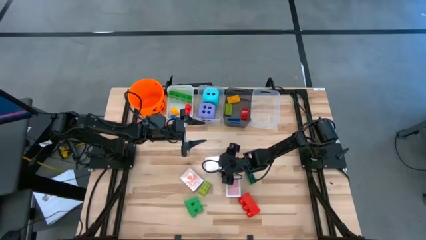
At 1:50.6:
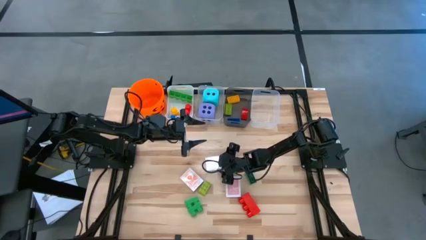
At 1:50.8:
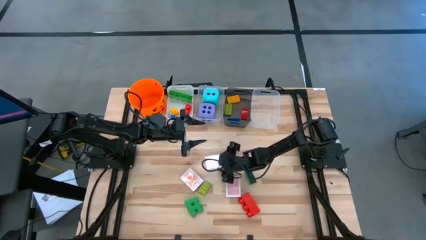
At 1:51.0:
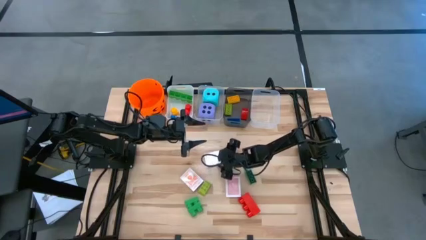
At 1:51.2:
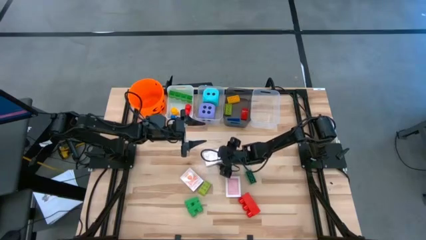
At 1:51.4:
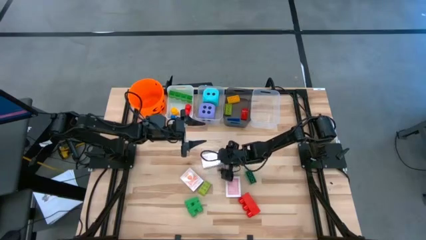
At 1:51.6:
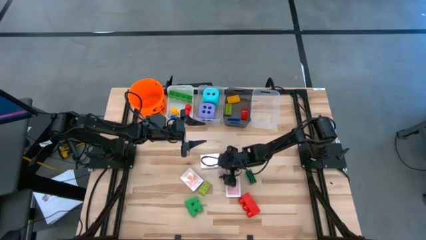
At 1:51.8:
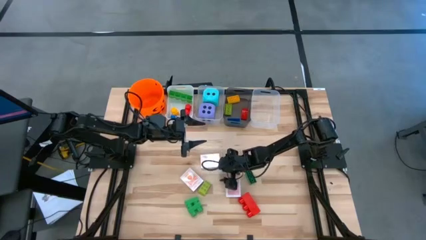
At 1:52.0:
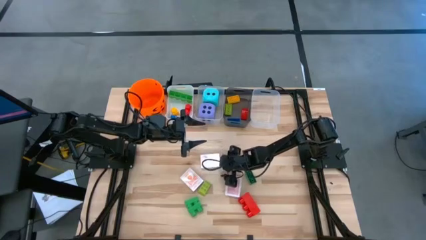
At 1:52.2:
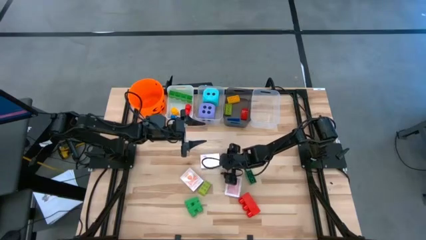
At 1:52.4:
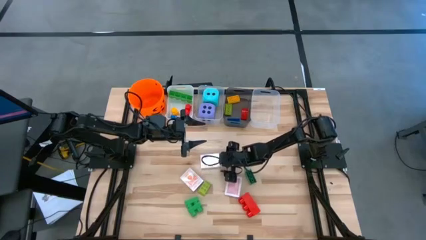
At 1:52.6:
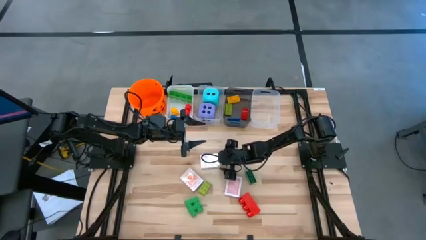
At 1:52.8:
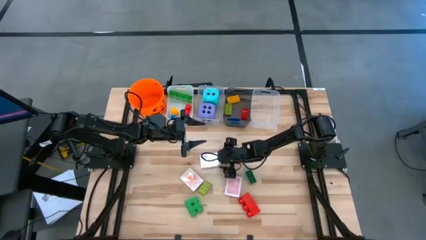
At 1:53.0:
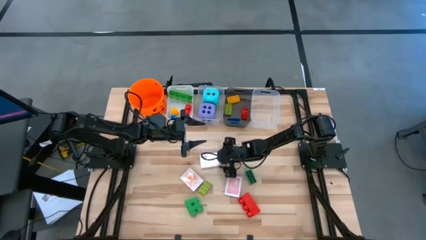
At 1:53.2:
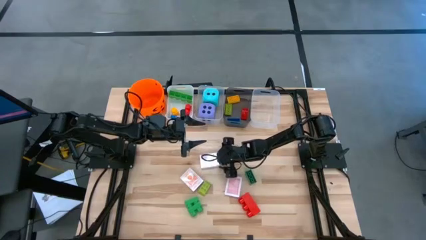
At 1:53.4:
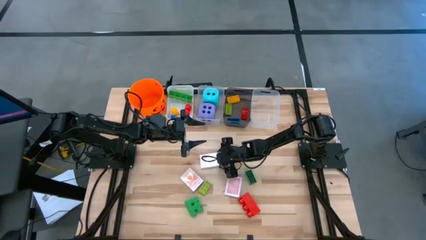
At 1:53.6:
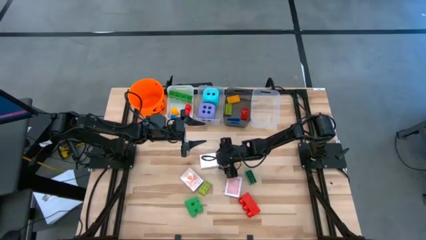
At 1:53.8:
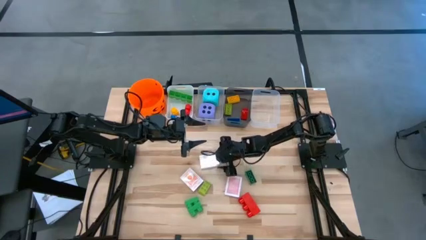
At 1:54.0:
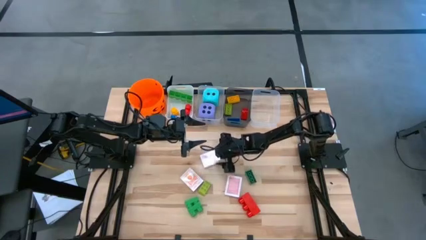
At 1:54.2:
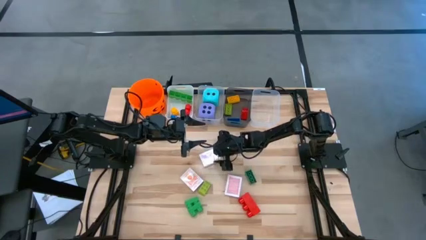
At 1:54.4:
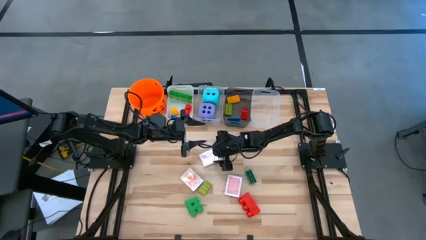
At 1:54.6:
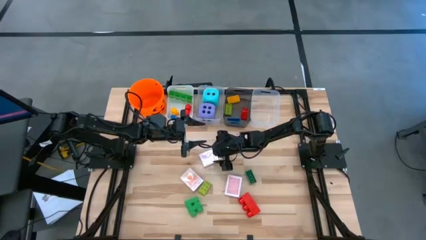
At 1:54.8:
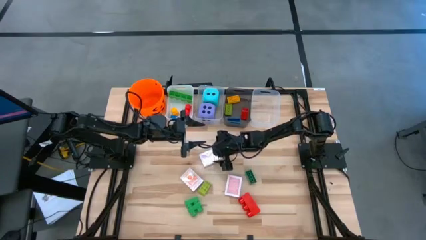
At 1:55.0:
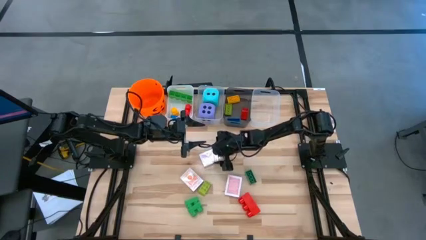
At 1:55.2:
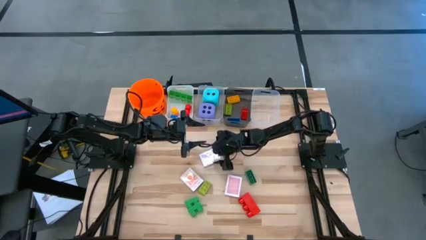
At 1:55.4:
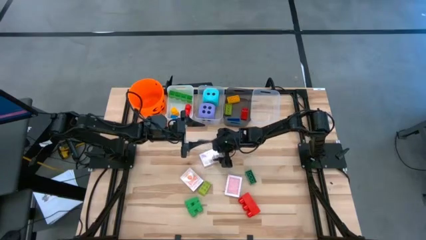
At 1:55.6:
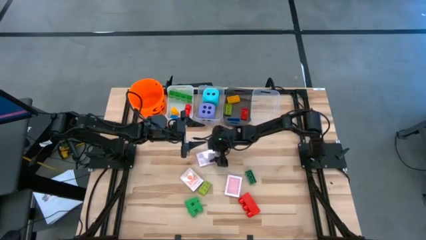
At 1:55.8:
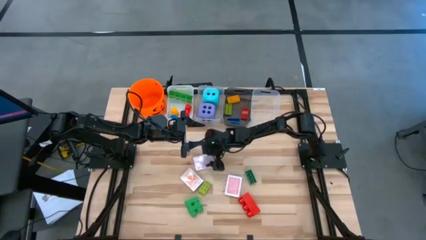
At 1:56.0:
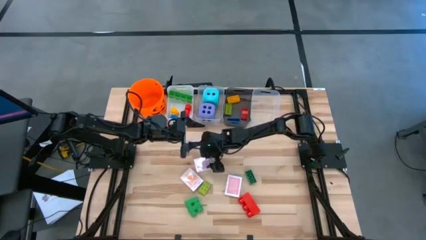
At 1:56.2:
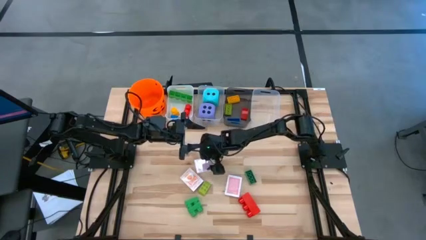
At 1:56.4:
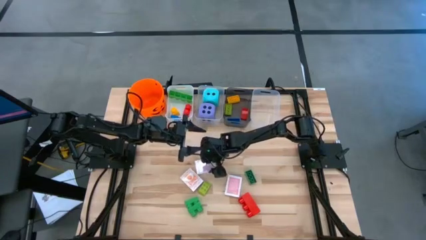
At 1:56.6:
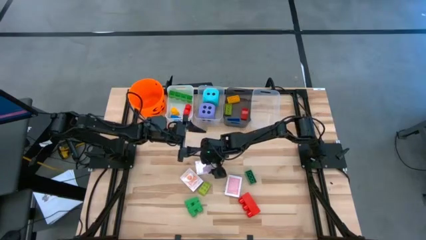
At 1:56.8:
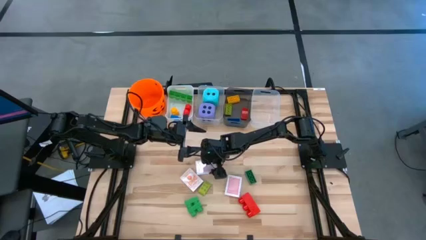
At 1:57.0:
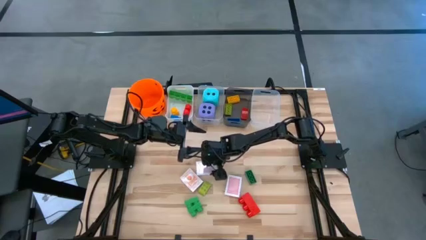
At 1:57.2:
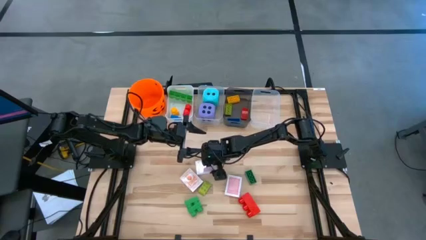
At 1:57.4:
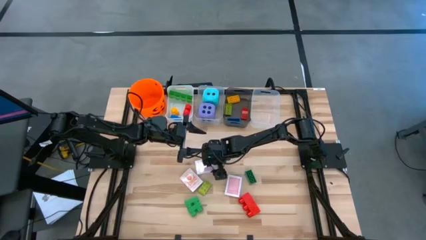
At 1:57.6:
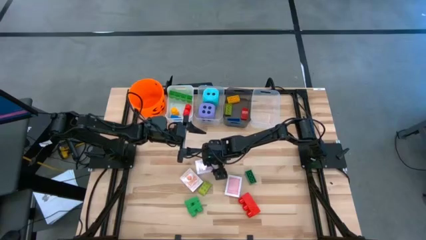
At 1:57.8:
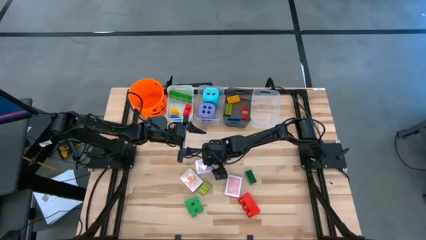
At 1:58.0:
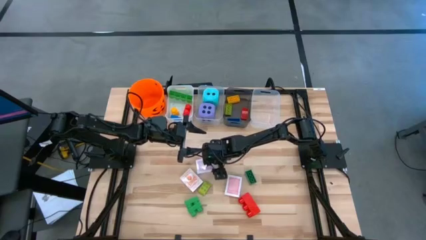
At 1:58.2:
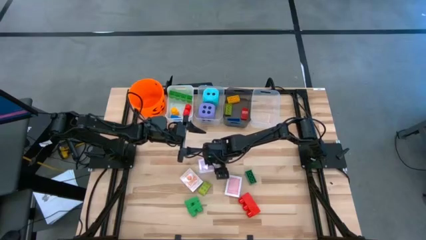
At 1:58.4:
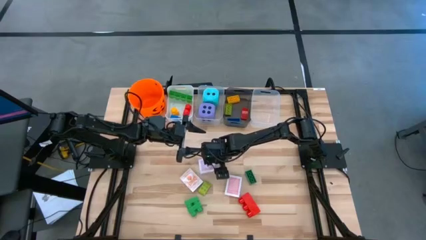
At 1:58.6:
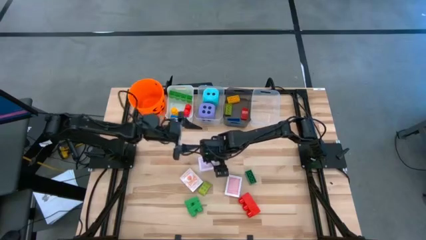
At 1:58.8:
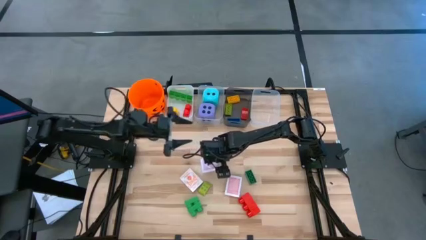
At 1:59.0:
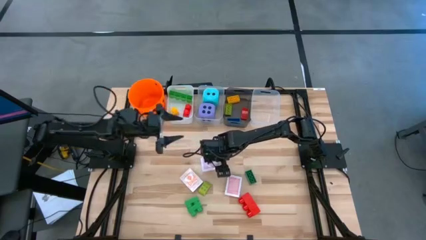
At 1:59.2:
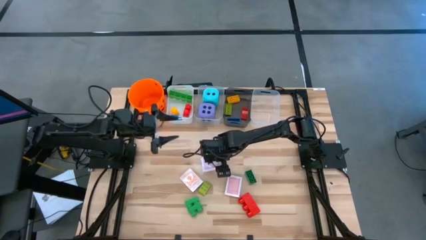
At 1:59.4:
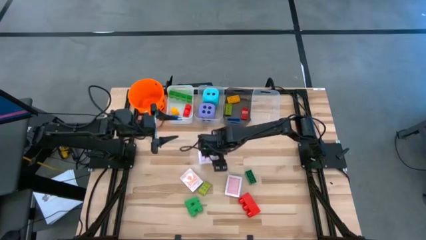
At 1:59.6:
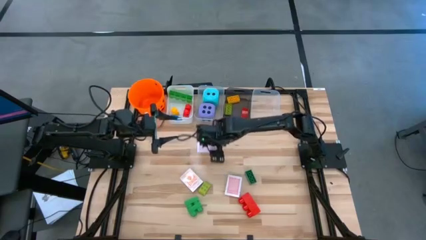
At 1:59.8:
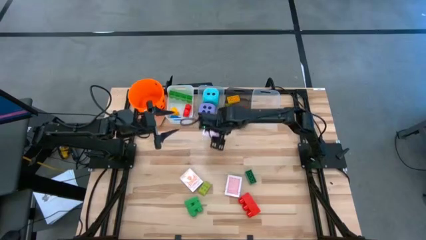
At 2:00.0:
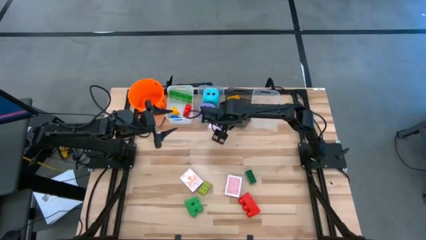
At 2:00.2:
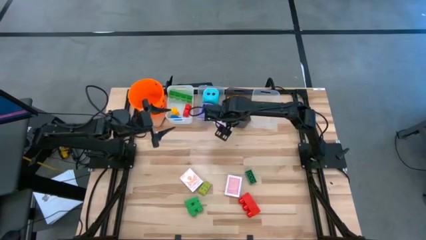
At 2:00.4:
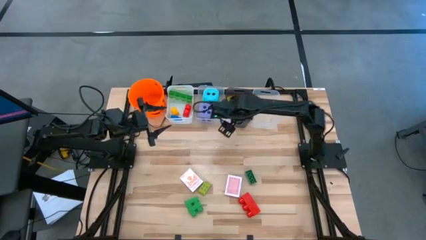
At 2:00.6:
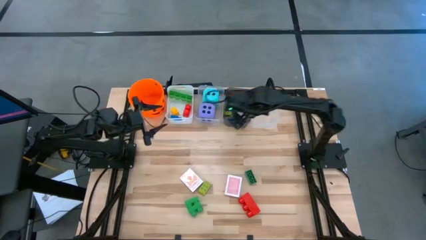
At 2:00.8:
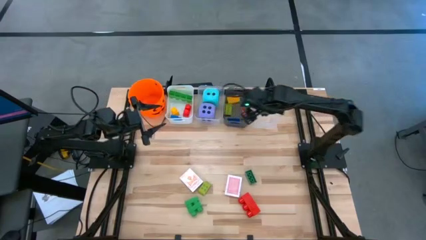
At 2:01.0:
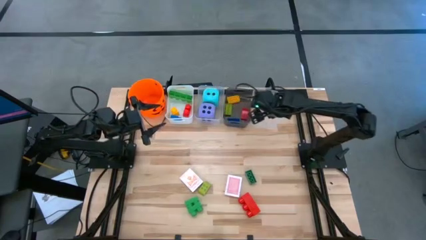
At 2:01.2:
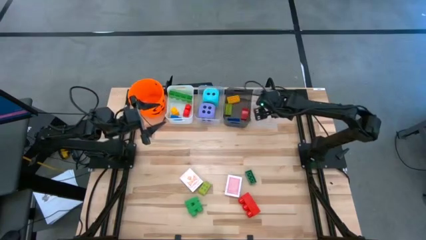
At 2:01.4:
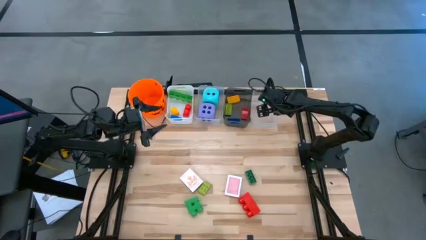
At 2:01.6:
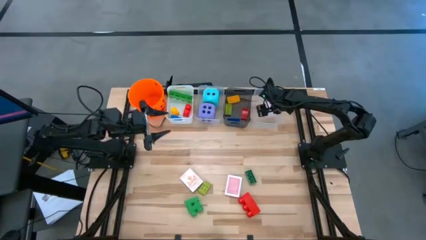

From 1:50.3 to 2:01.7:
Task: Pick & Place Toys
Put the top red deck of cards into the right transparent bin

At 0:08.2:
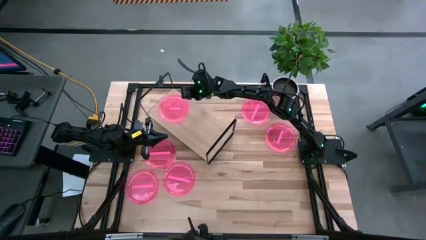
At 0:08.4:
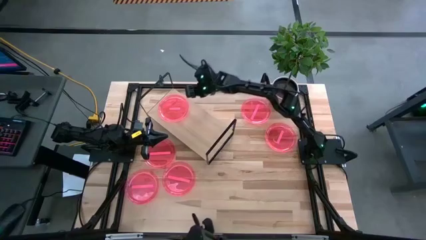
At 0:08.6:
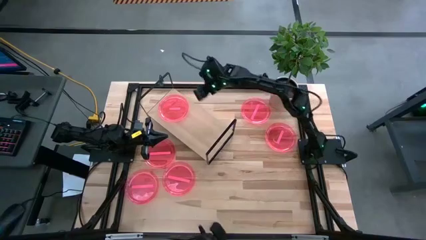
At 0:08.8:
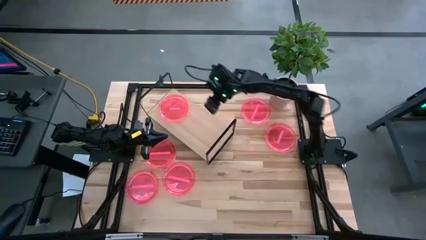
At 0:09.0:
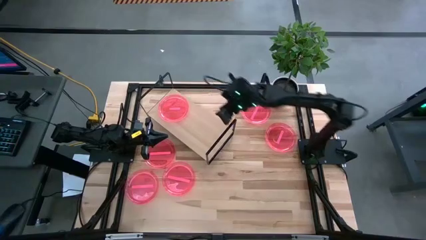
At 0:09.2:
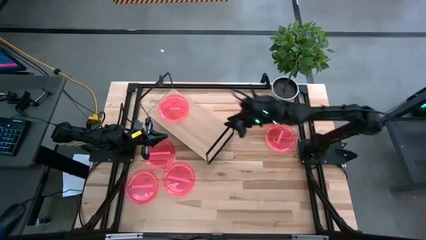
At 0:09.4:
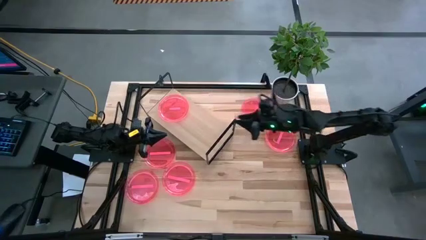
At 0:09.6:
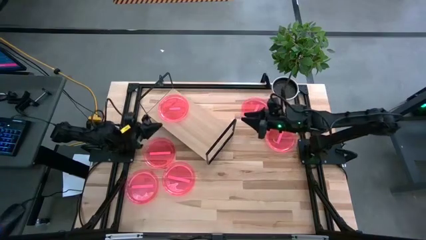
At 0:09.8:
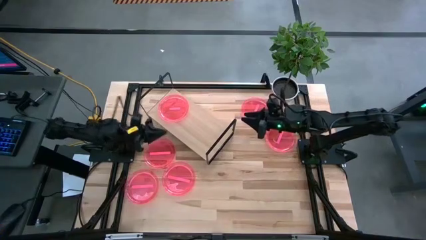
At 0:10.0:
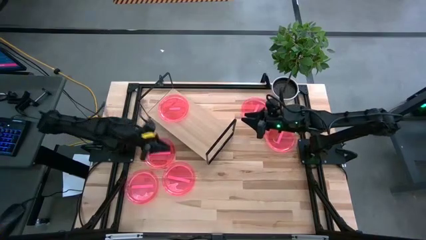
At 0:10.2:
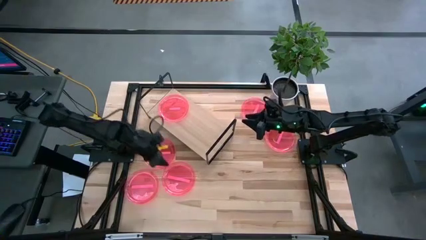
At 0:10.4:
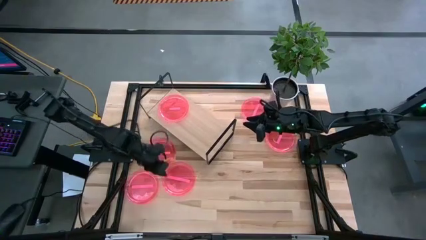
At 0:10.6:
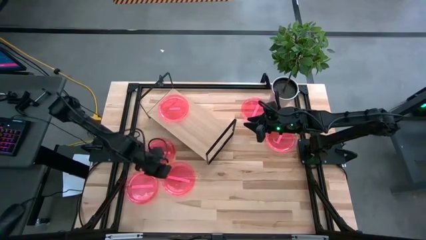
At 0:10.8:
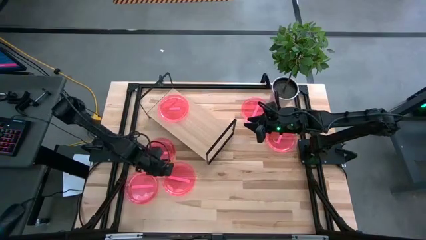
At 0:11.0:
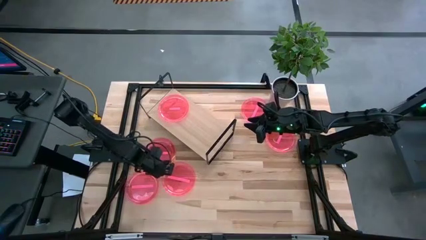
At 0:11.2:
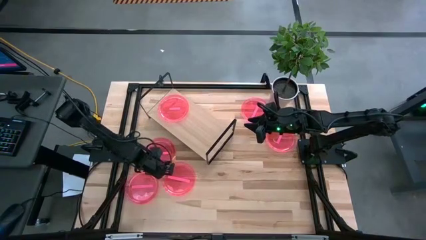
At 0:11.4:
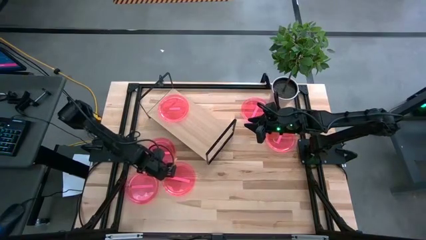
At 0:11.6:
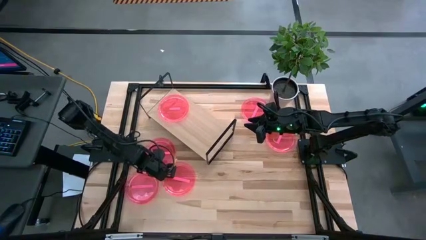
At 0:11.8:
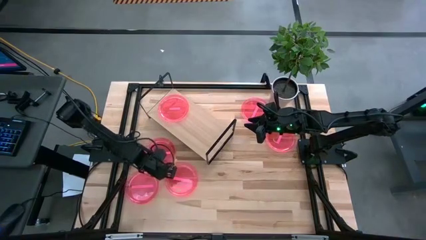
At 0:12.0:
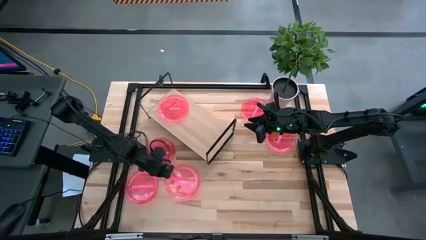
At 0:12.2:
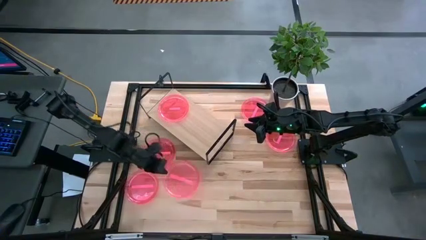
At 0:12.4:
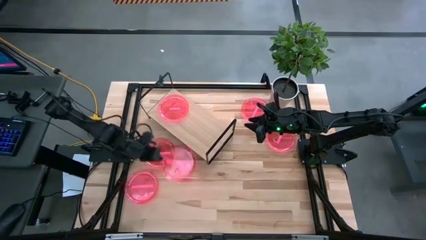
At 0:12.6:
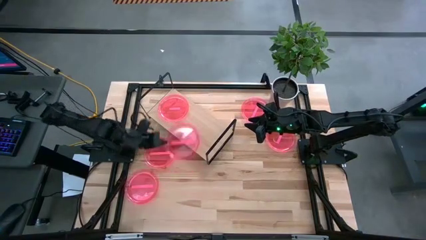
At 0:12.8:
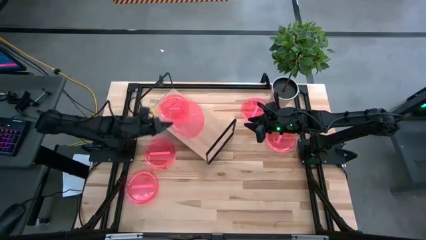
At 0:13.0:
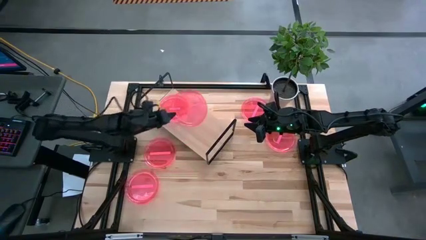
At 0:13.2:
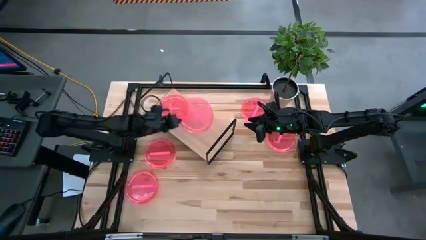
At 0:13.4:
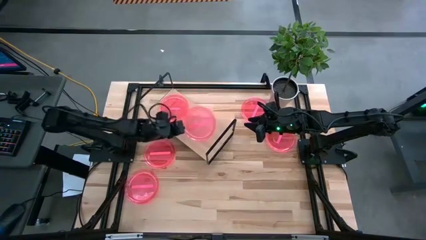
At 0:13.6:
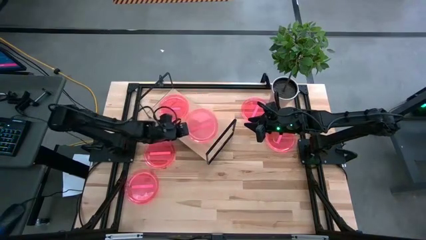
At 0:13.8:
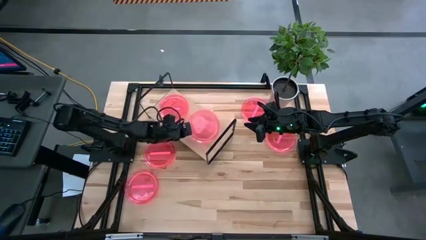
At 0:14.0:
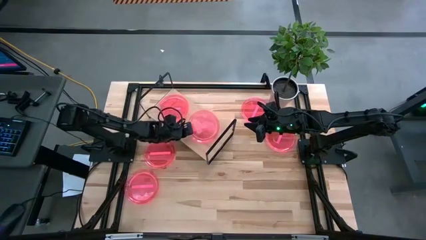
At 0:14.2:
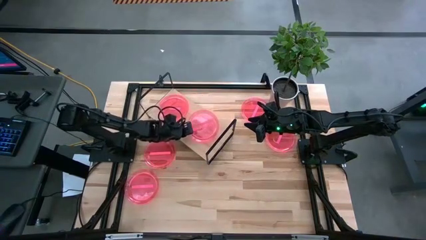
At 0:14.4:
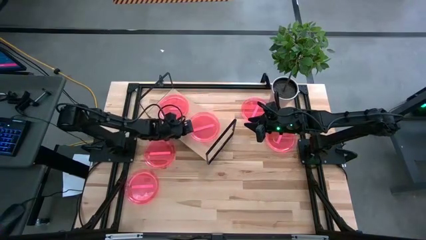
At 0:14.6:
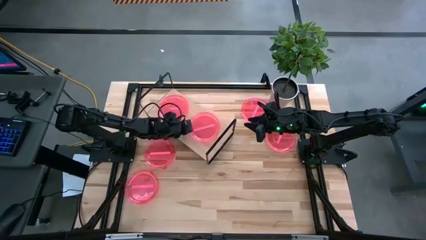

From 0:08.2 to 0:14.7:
Task: Place and stack plates onto a shelf
Put the pink plate on the shelf
